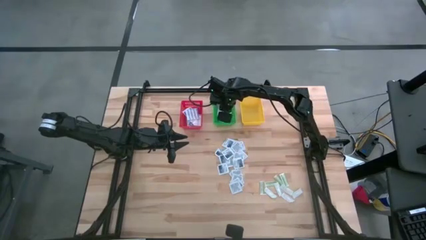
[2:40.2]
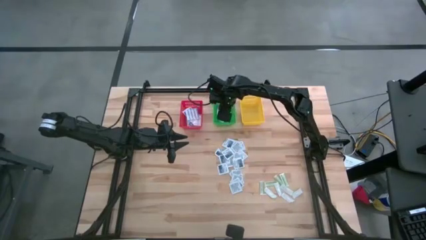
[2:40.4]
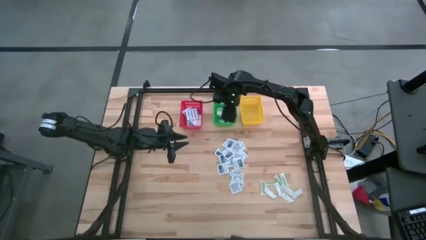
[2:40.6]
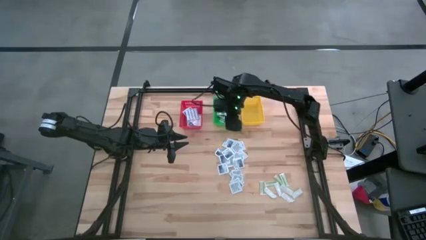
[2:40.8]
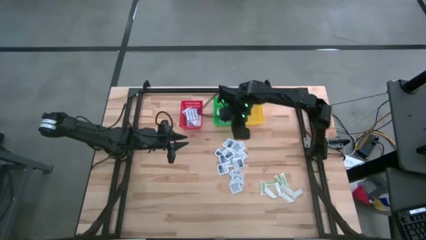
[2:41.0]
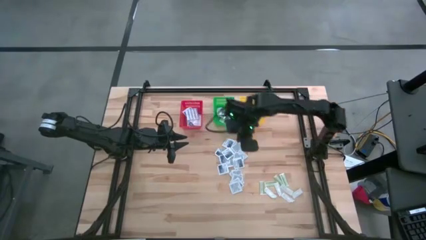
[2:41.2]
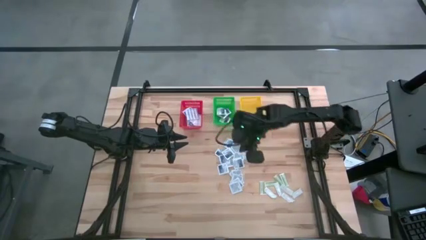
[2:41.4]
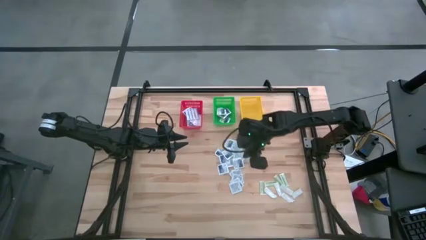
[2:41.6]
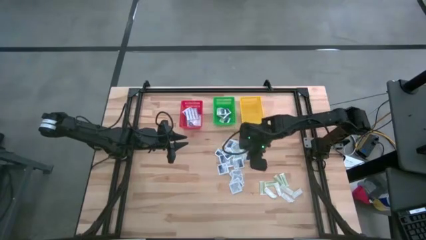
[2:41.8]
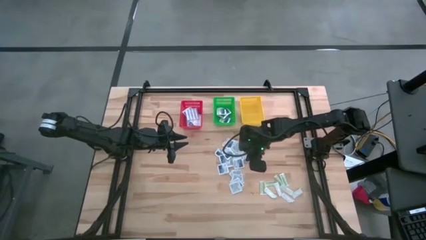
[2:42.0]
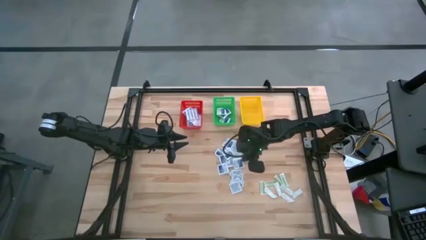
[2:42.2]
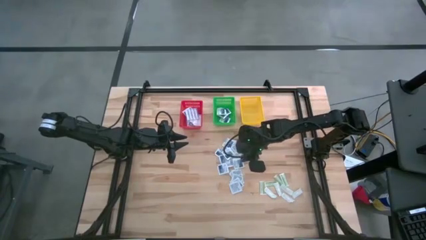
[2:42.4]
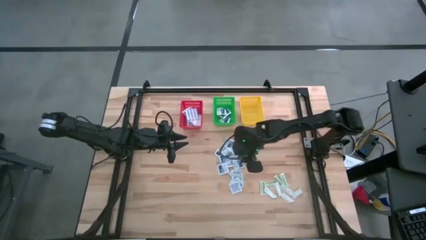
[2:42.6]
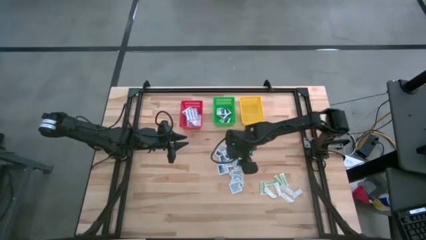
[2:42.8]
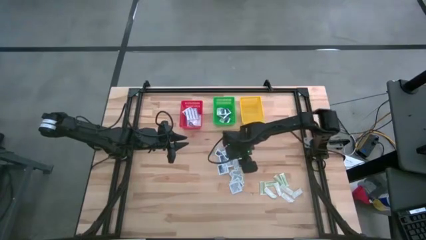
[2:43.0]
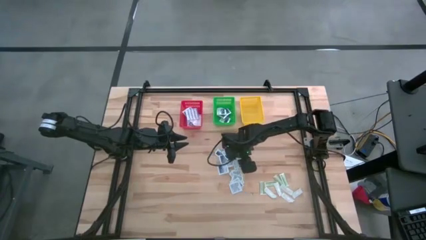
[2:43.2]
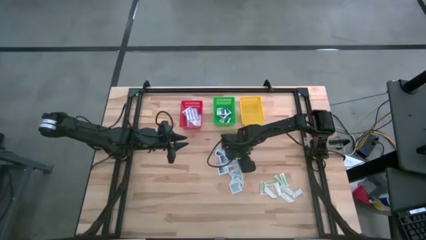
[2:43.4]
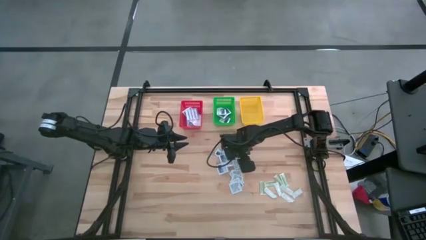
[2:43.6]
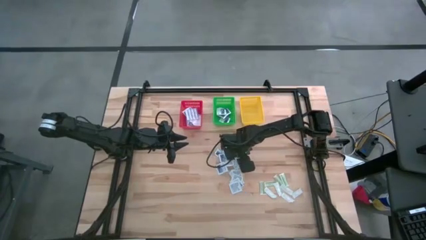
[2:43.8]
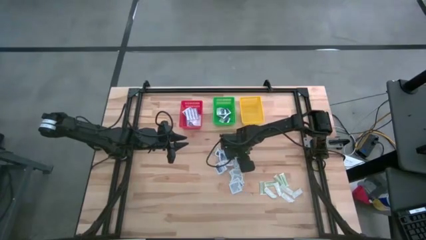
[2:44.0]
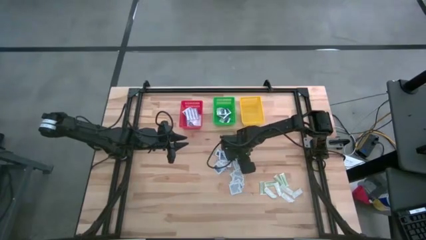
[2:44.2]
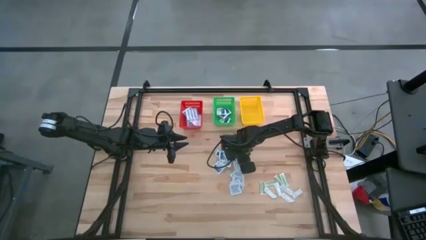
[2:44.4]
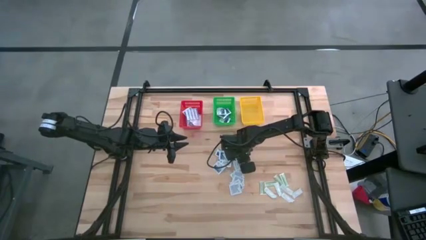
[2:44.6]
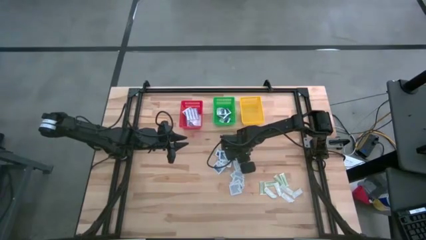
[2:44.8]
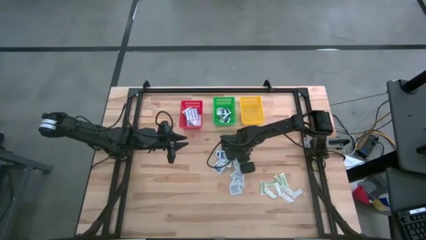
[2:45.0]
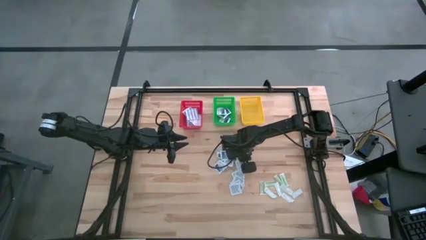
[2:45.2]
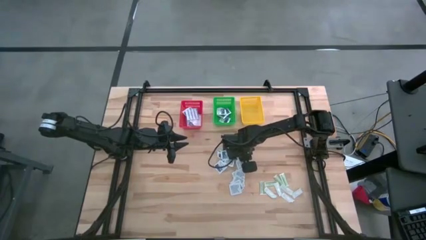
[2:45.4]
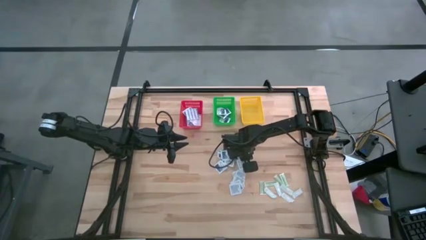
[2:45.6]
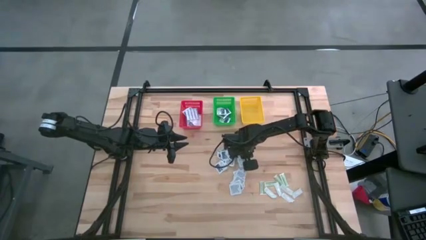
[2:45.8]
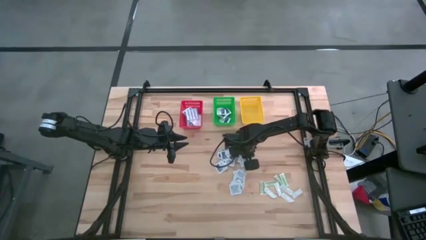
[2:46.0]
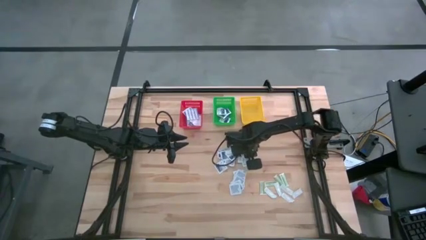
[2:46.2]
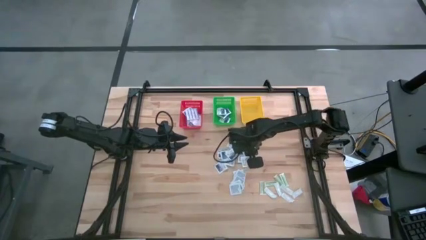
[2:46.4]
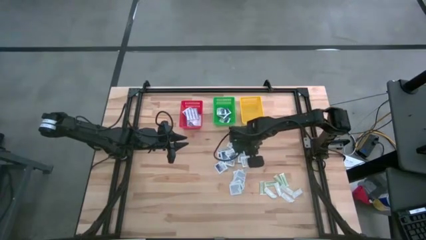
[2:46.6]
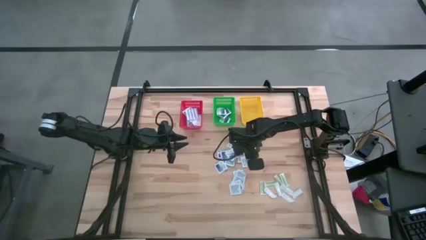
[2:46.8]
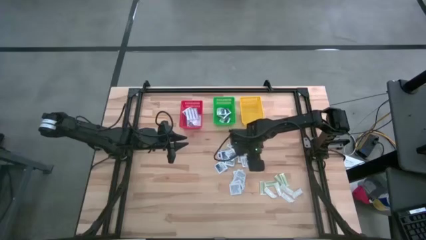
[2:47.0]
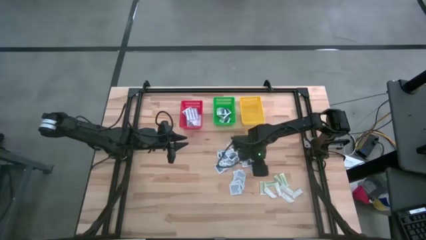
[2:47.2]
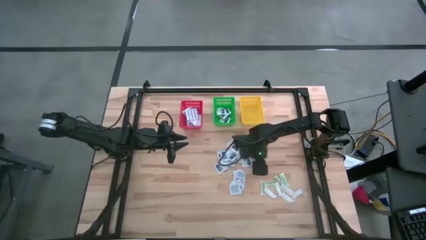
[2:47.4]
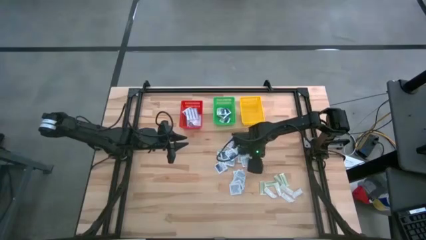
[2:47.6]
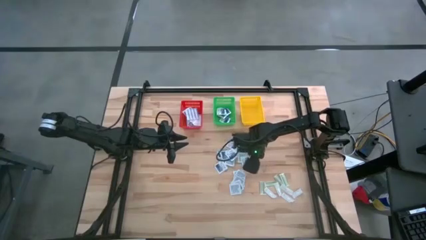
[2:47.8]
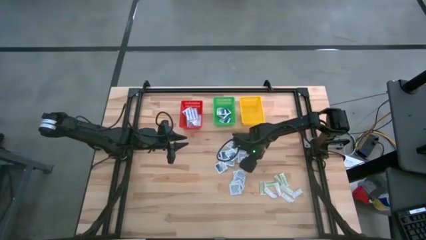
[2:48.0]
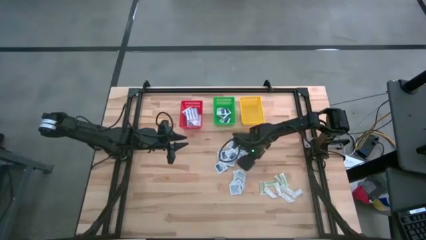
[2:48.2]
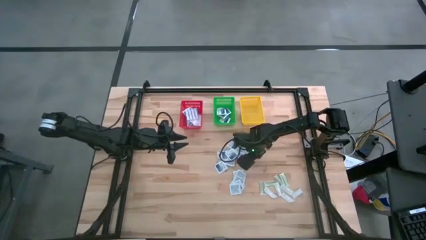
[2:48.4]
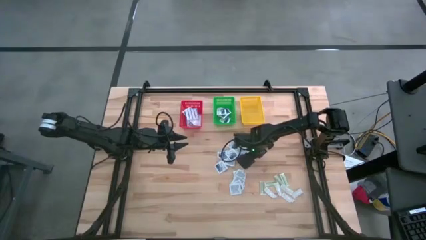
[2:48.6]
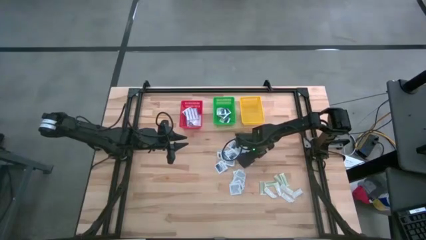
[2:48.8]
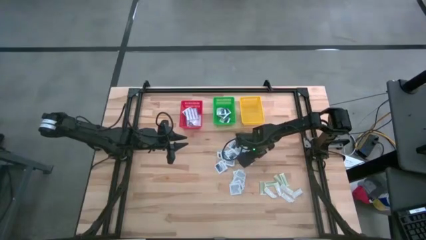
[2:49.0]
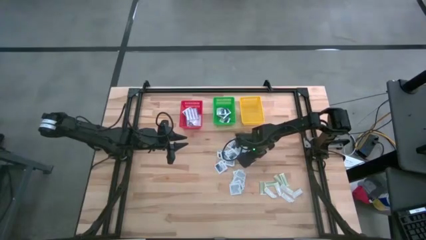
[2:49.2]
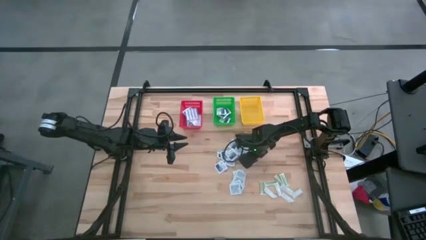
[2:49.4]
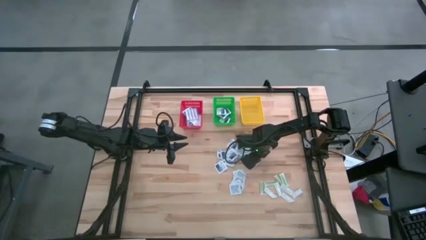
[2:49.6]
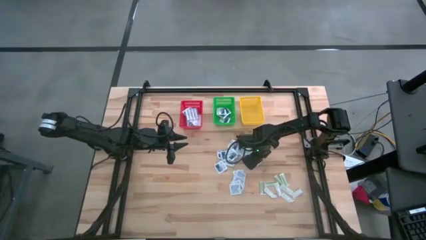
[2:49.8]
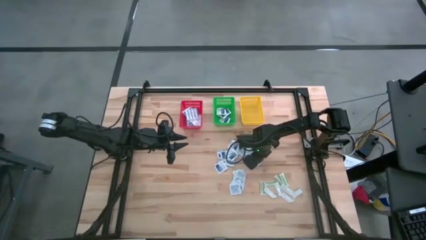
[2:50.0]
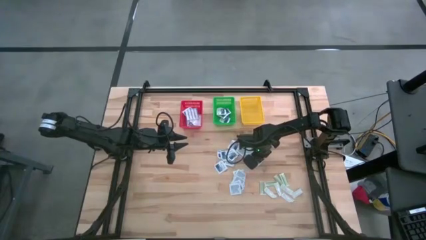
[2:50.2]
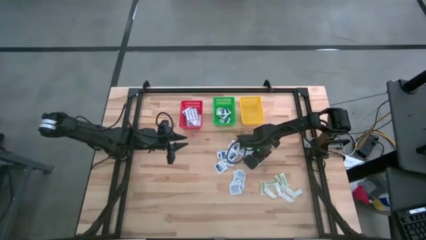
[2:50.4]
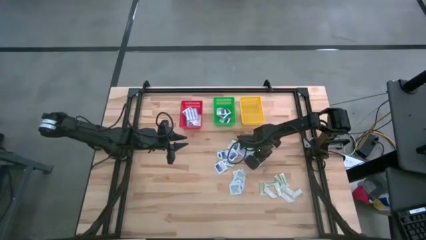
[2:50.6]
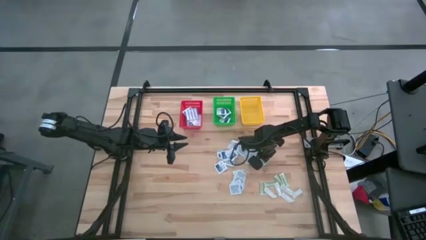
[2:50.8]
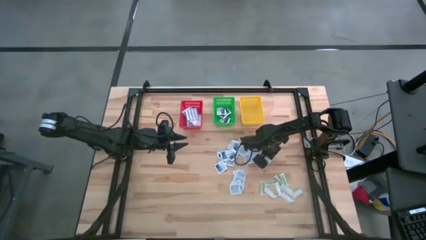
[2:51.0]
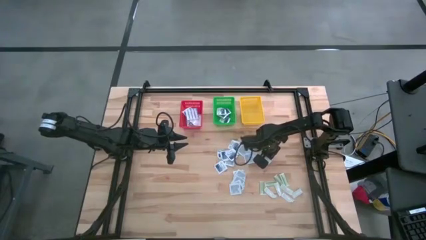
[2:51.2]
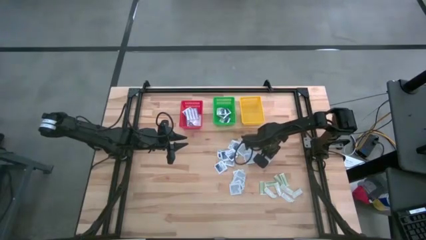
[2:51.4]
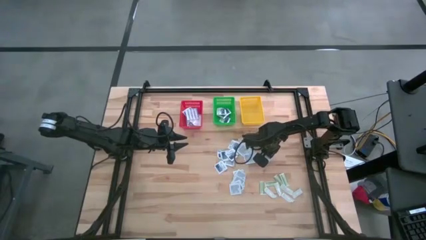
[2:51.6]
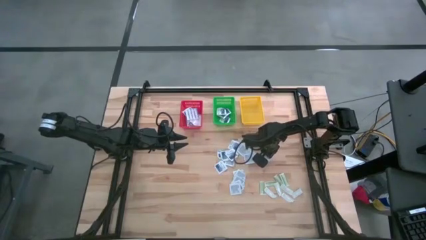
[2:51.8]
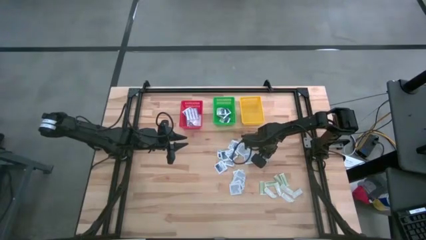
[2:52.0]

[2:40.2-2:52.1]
Task: Pick & Place First Aid Supplies
Put the alcohol pad into the green basket

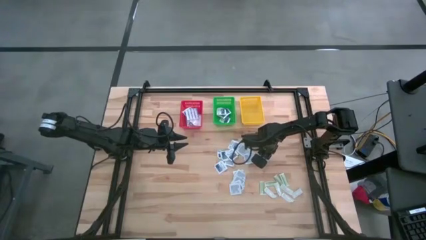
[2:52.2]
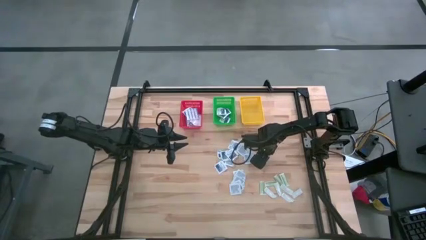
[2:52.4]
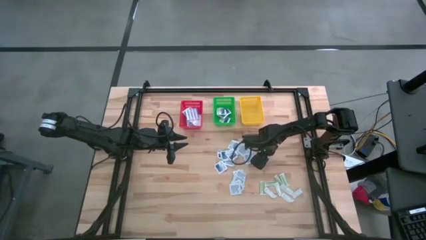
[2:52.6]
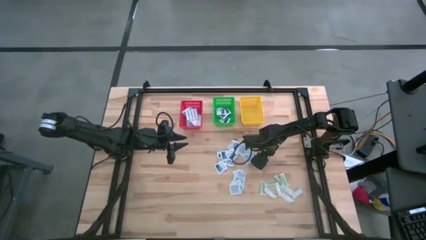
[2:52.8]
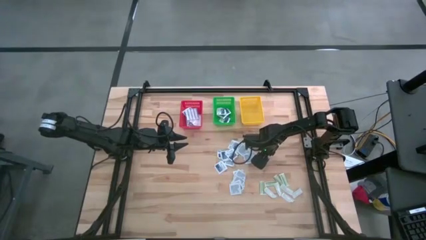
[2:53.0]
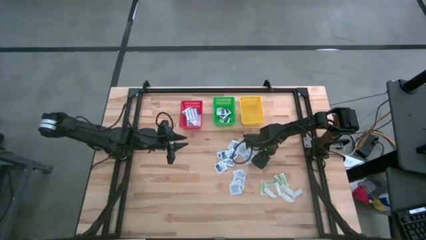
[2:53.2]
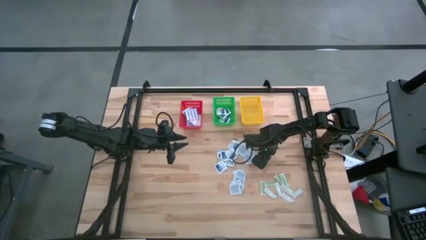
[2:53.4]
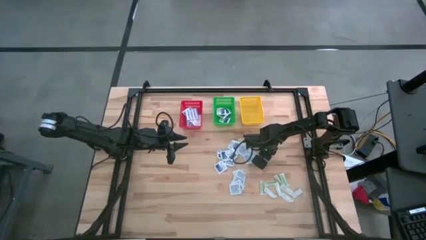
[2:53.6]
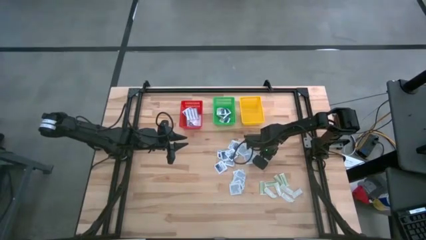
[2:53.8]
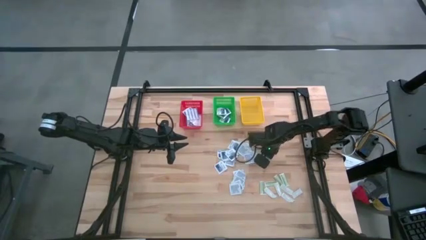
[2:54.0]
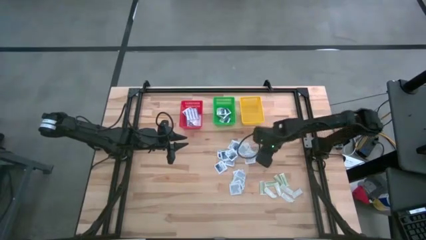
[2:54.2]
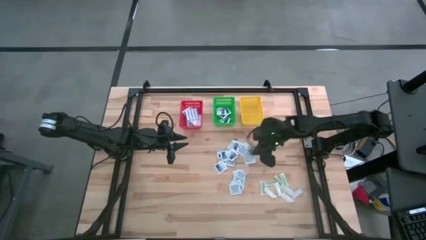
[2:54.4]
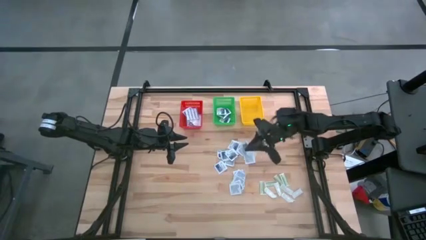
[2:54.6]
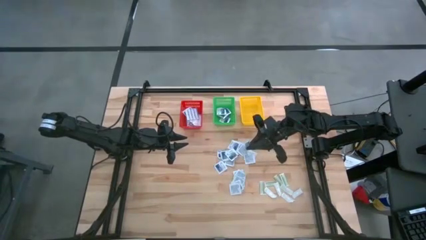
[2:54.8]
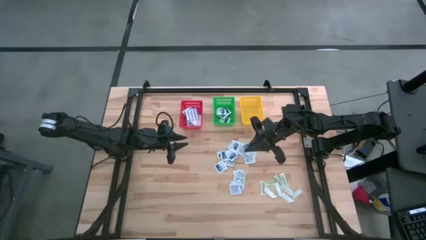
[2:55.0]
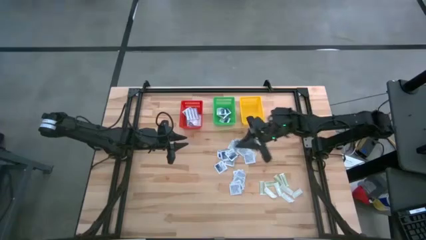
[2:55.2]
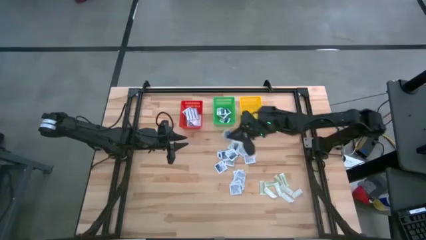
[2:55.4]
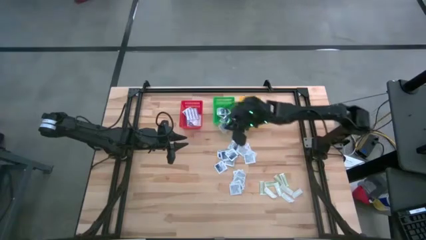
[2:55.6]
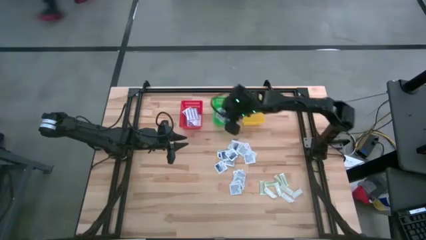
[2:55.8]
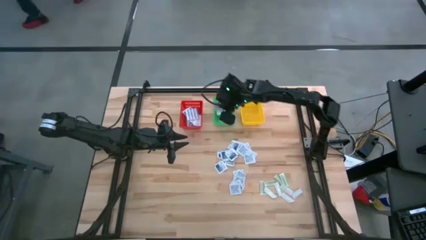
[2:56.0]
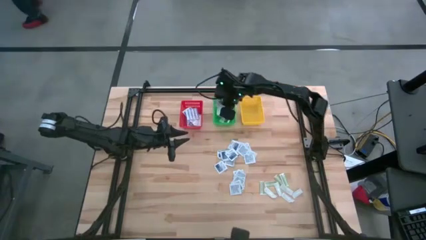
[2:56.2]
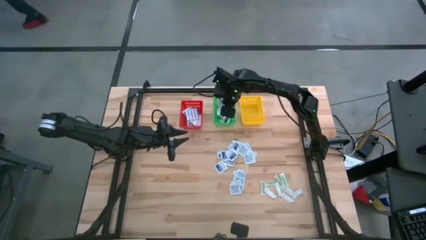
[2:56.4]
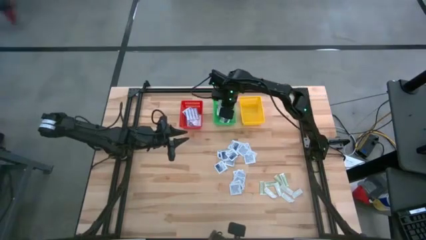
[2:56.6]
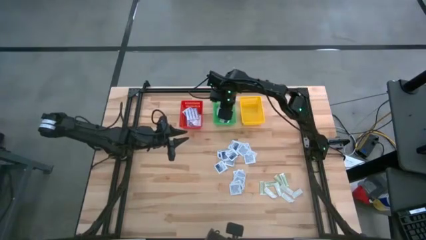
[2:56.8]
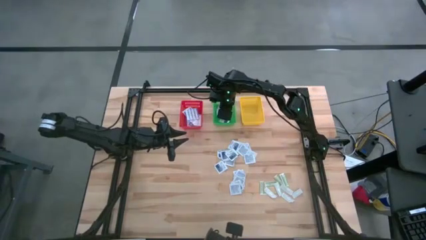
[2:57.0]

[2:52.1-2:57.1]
Put the alcohol pad into the green basket
